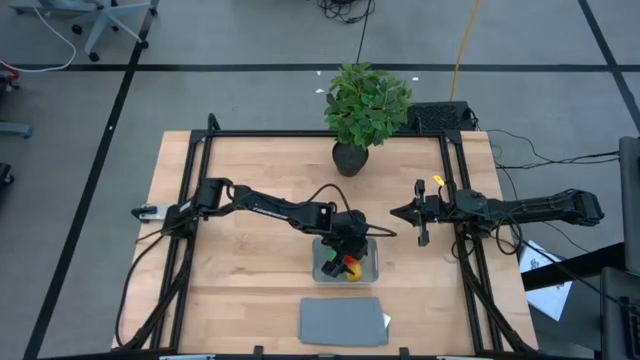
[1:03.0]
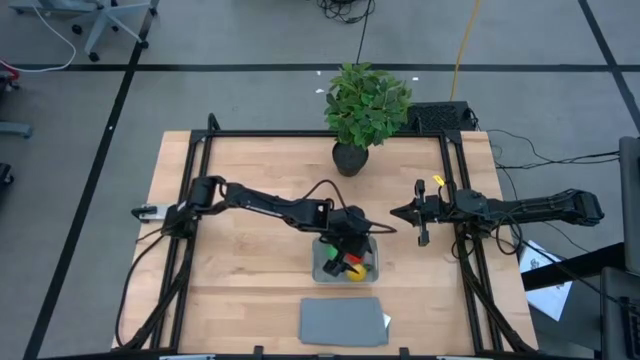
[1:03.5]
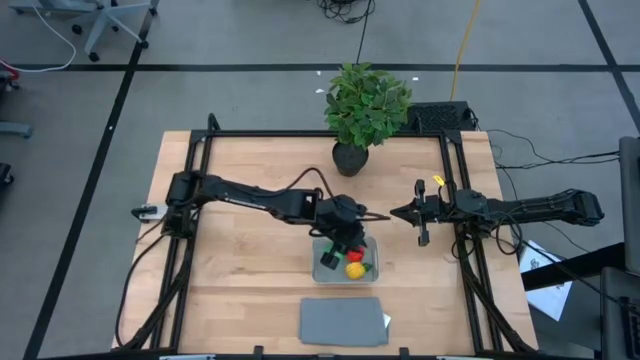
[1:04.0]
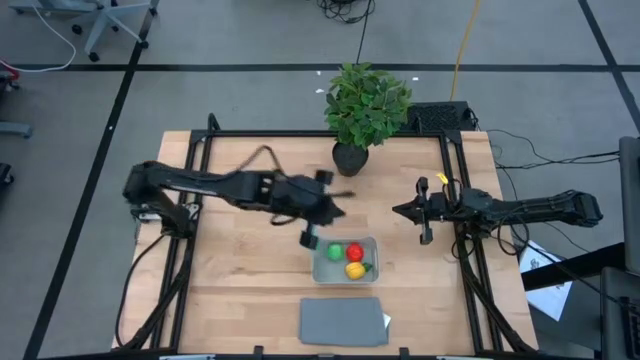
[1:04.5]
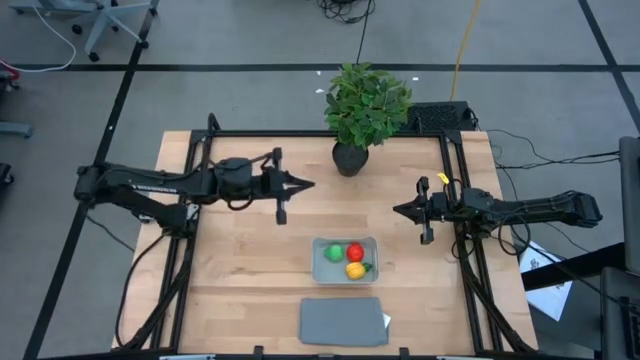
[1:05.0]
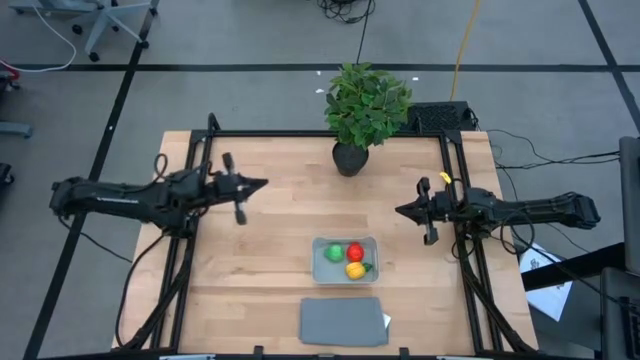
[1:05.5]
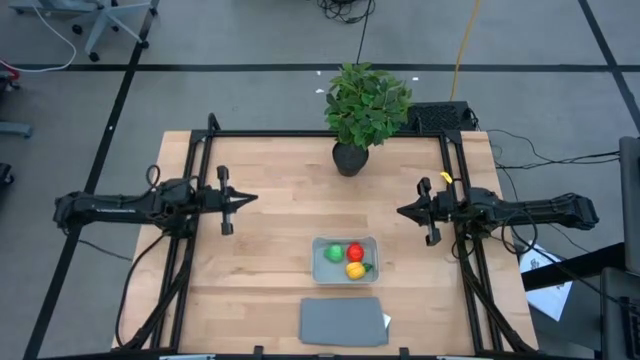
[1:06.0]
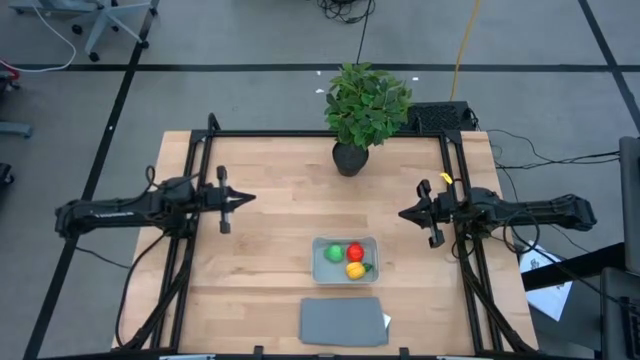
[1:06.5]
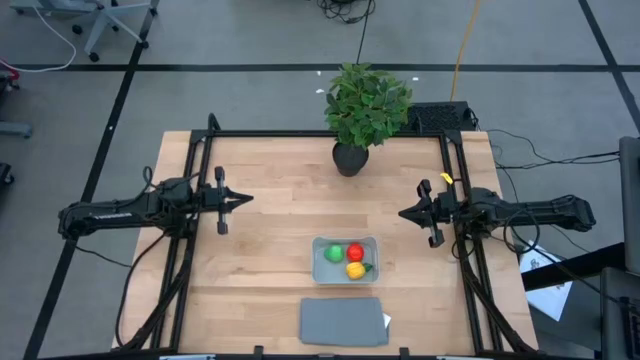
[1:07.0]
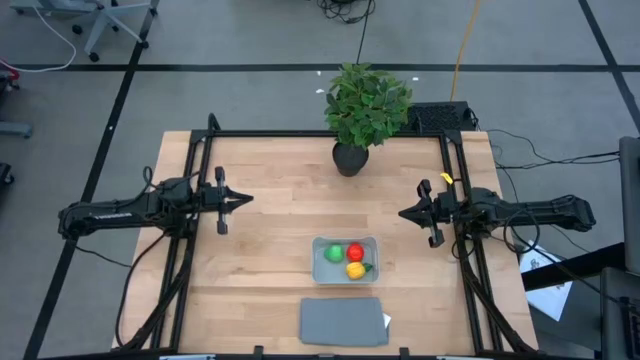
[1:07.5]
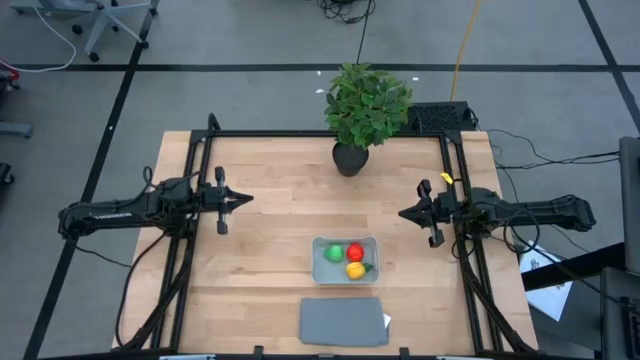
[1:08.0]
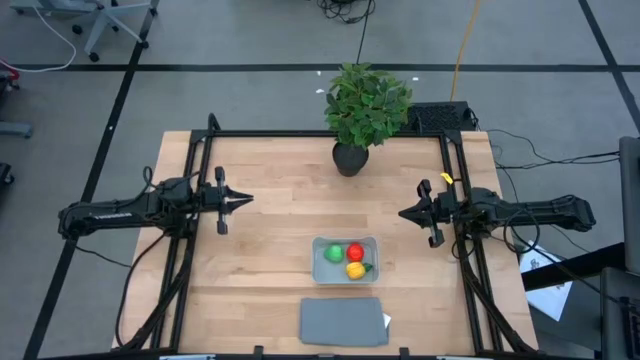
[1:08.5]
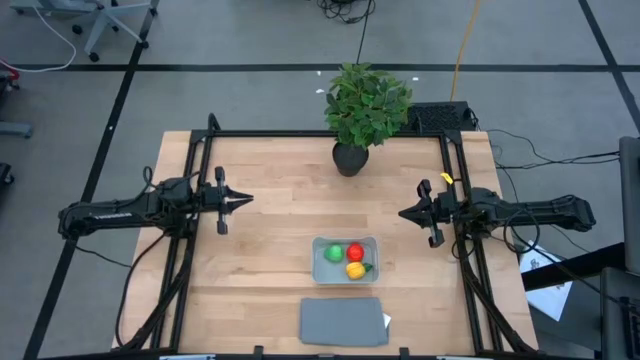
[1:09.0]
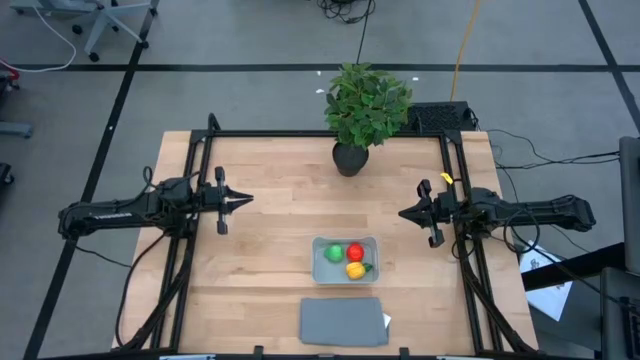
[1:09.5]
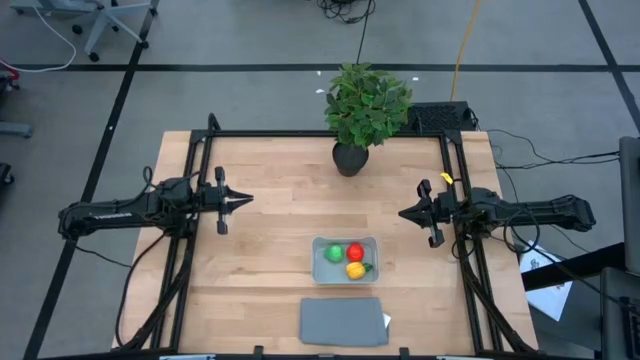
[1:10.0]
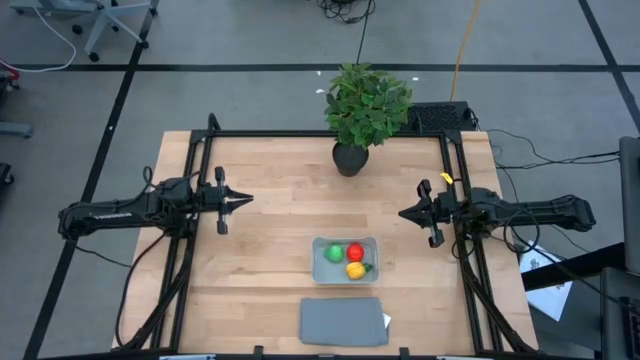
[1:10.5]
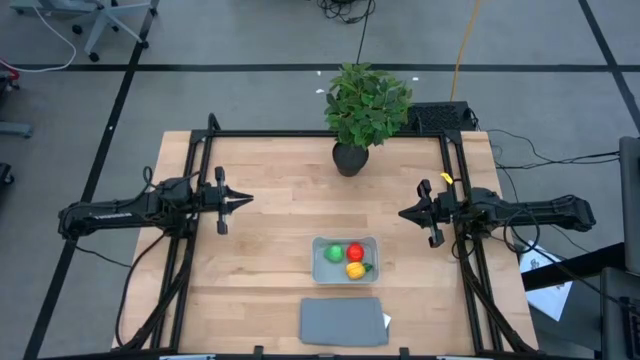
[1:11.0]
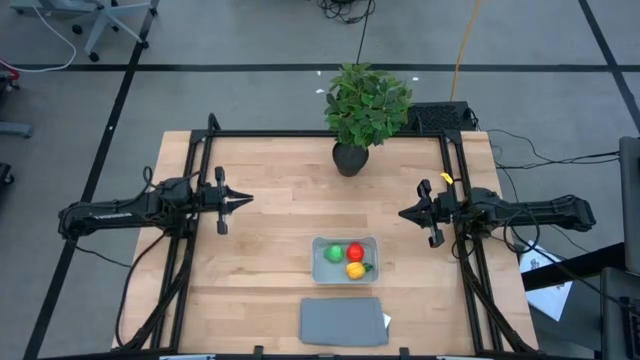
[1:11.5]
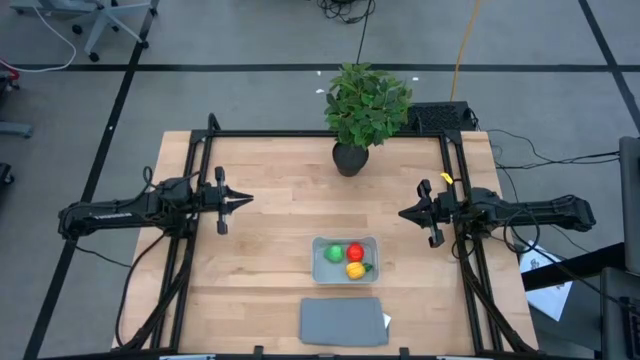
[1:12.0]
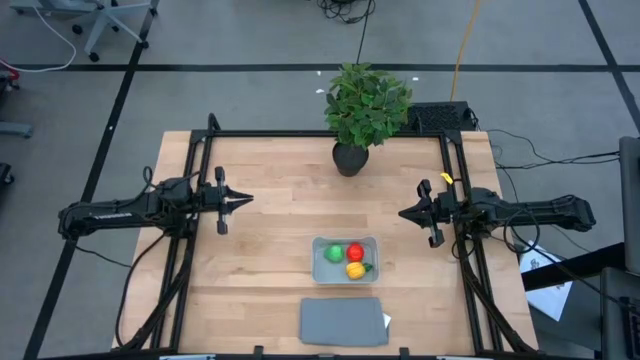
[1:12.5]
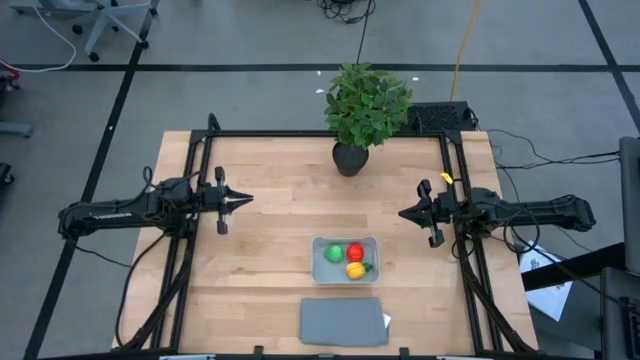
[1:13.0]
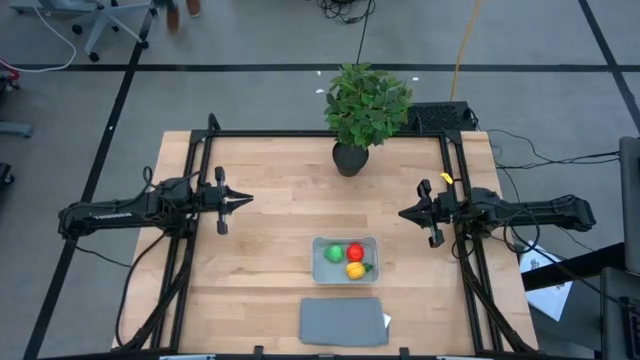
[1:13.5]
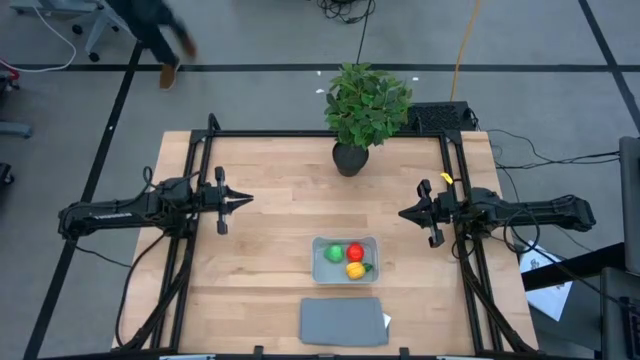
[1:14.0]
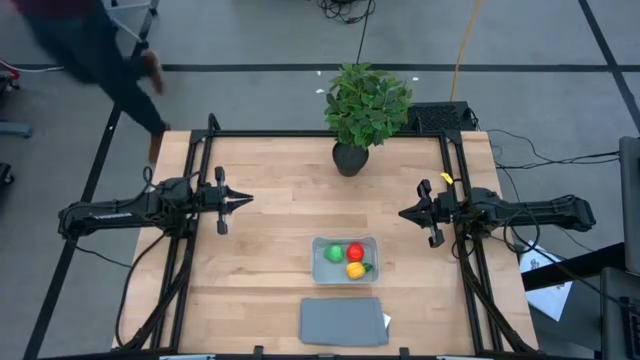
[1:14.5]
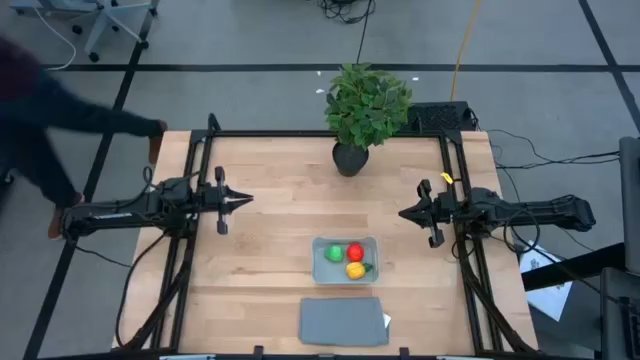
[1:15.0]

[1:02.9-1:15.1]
Task: Pick and placing Produce into tupperware
Return to Home Position

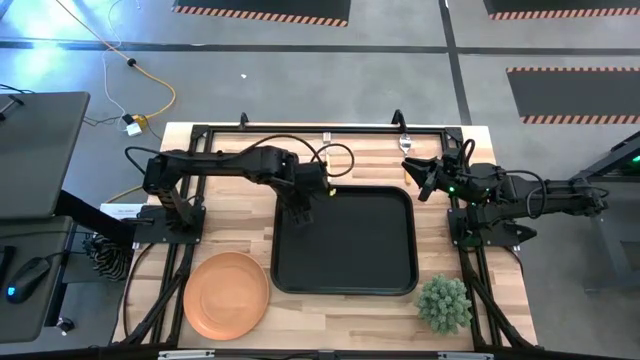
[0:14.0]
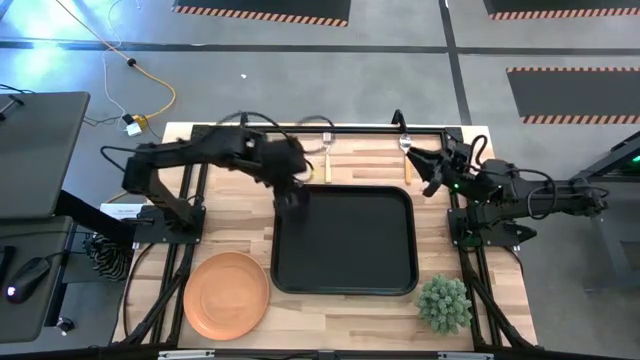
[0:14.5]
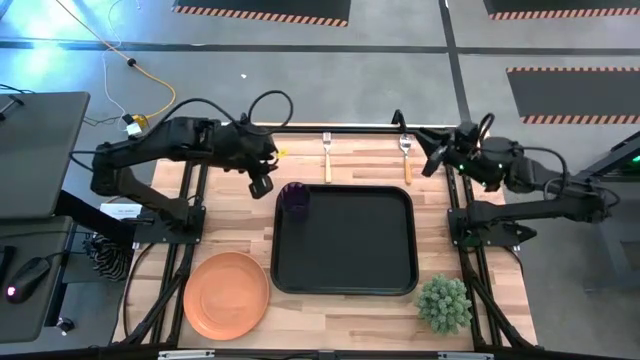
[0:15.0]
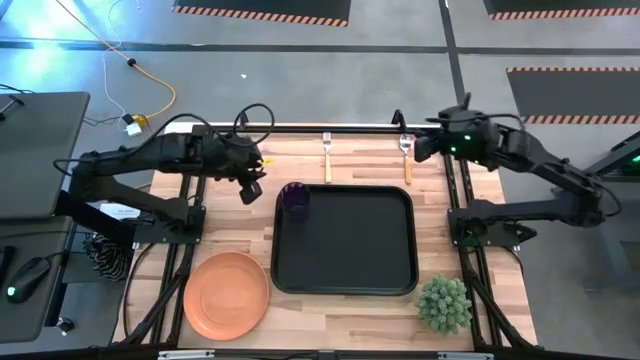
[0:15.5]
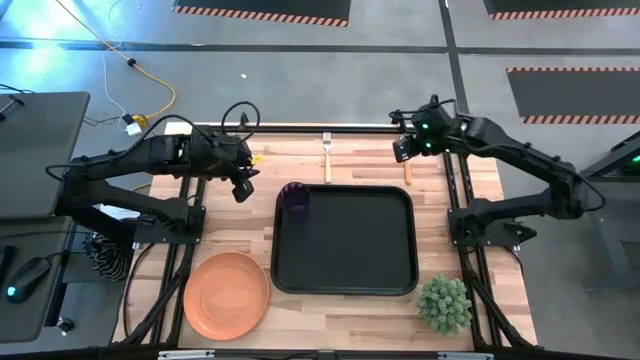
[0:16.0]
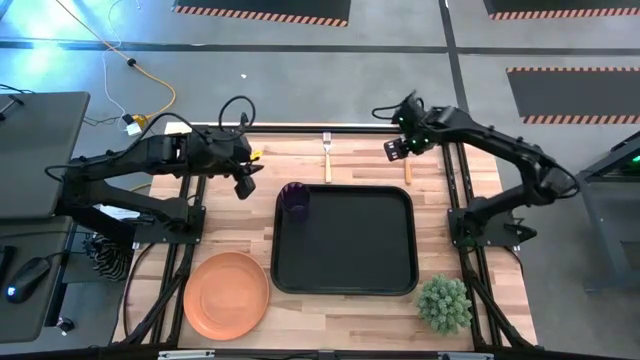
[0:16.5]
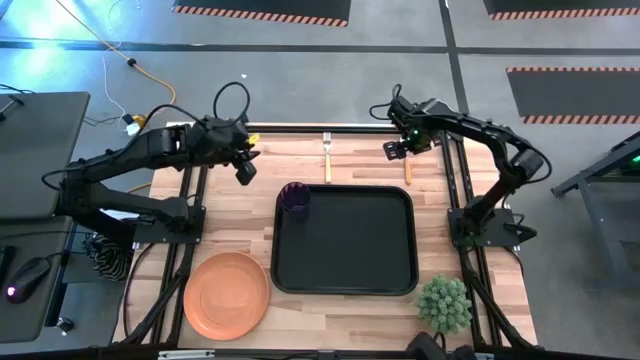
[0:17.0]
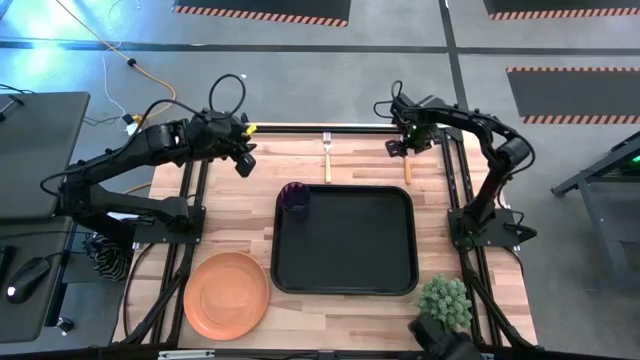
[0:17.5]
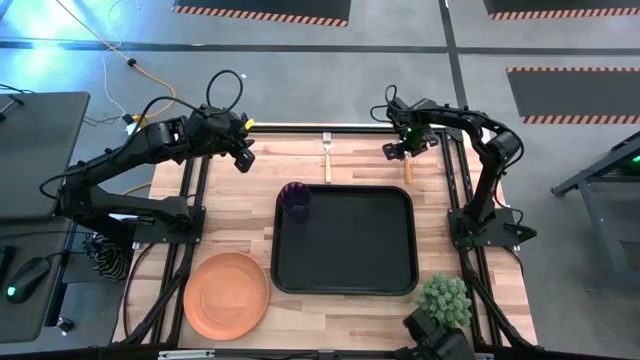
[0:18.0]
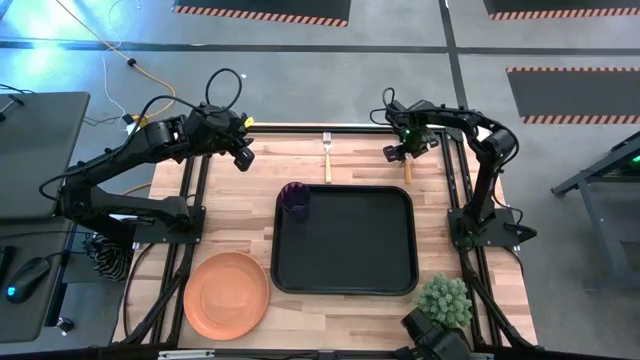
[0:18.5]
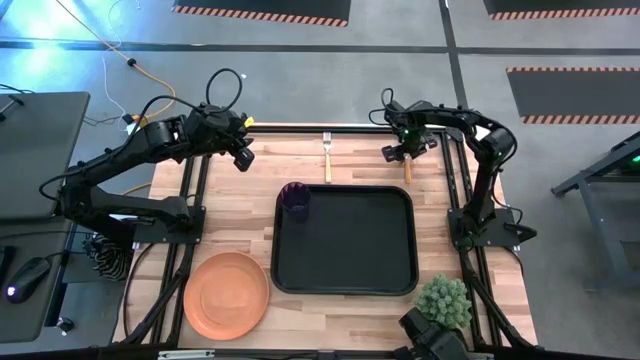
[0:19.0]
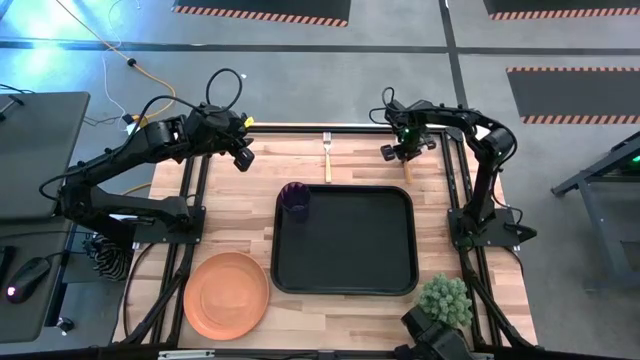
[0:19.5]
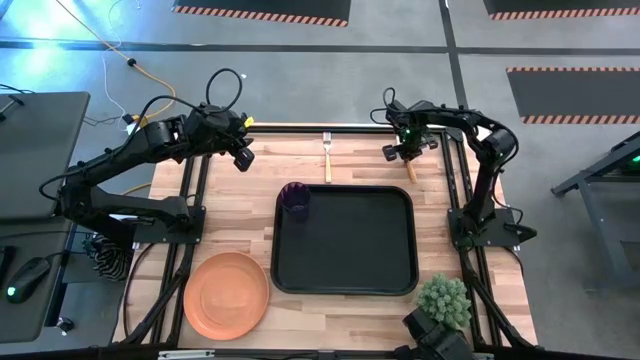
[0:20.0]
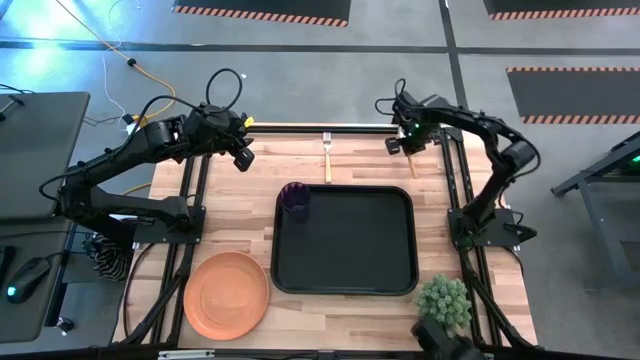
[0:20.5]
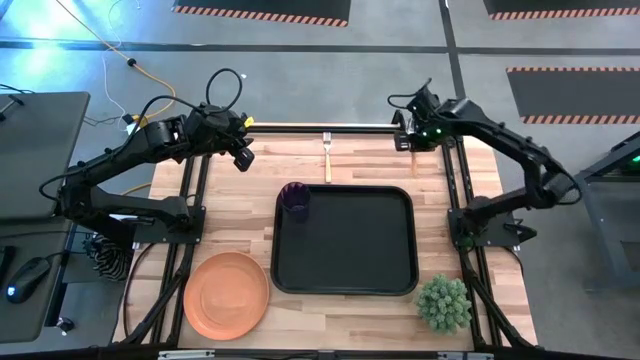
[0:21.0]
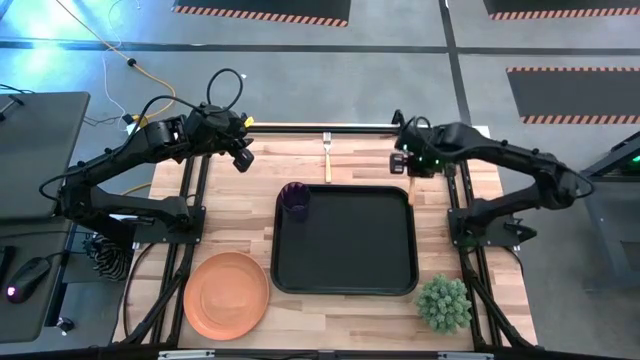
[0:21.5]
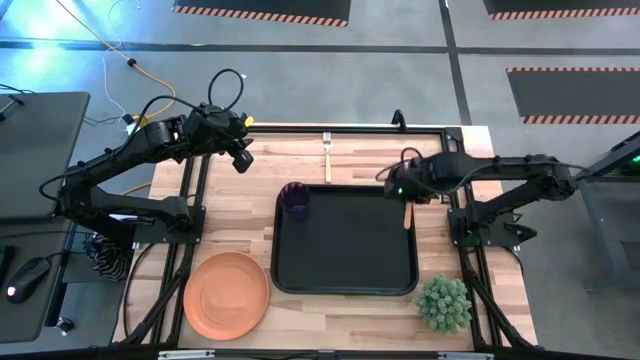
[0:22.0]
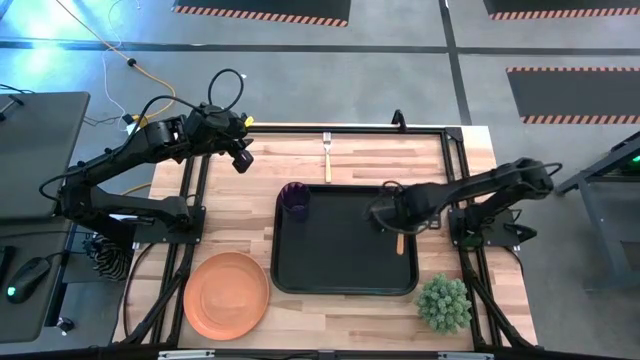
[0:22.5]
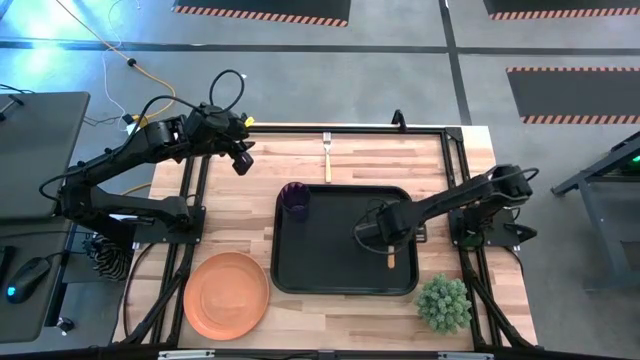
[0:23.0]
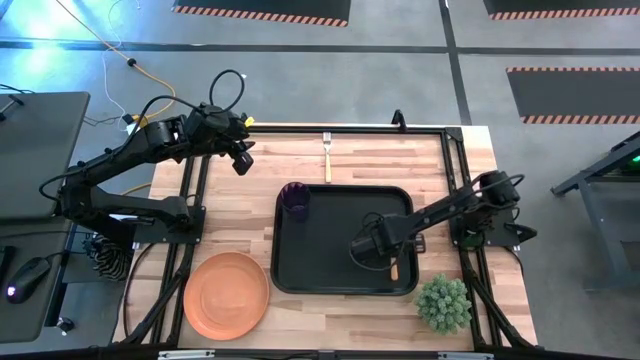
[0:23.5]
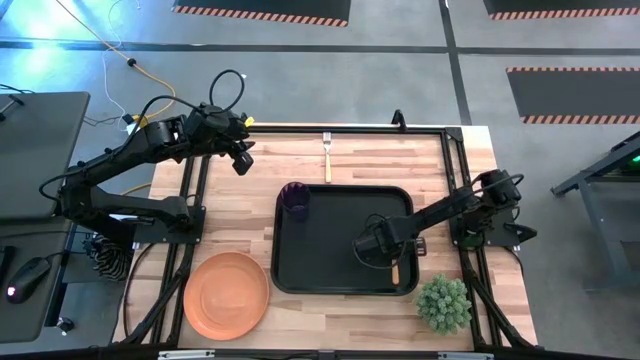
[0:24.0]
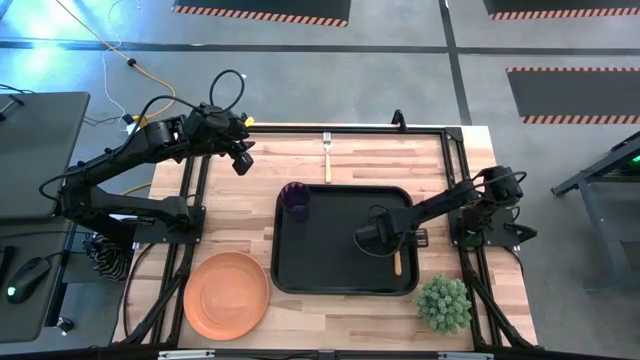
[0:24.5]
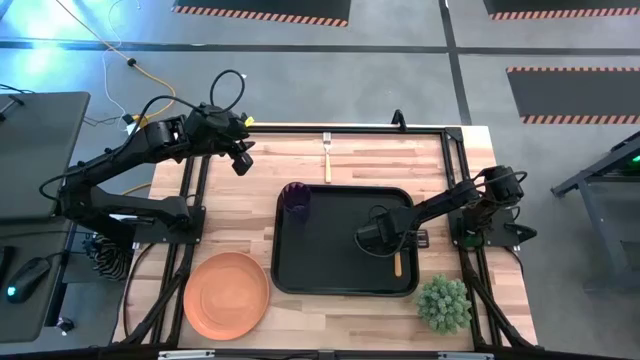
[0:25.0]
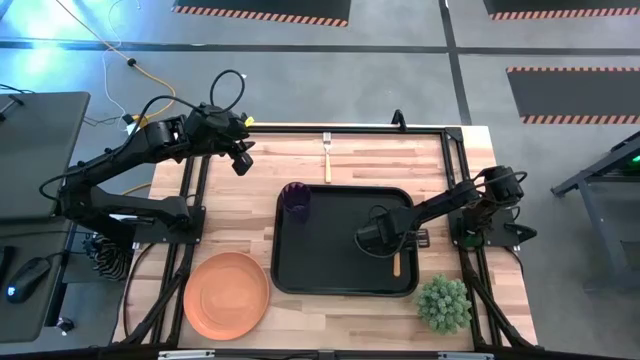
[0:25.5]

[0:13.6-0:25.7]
Task: Pick and place plate/cup/fork/spoon on tray
Put the orange spoon on the right side of the black serving tray
